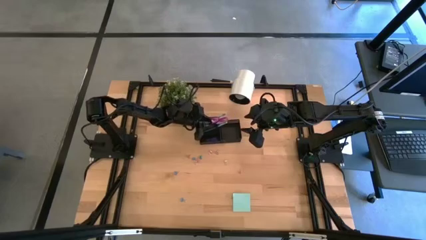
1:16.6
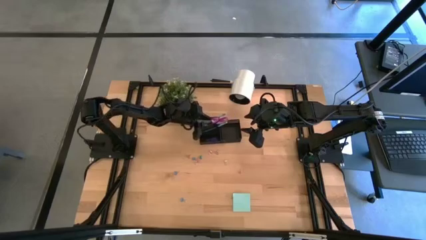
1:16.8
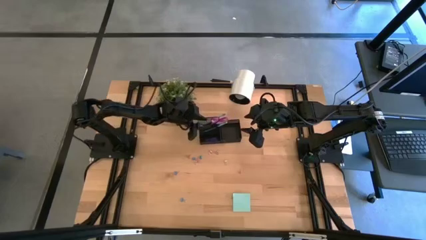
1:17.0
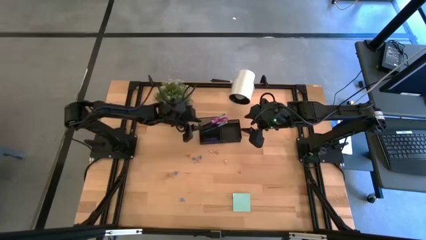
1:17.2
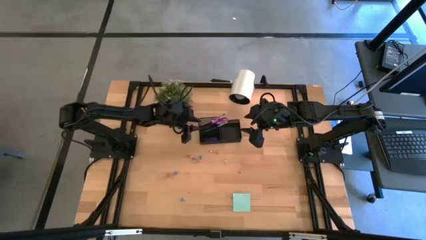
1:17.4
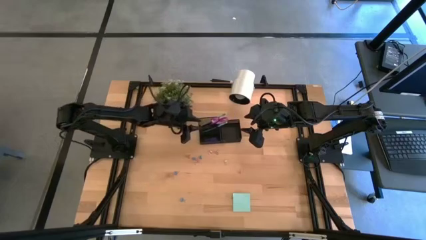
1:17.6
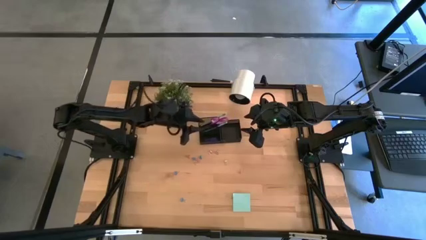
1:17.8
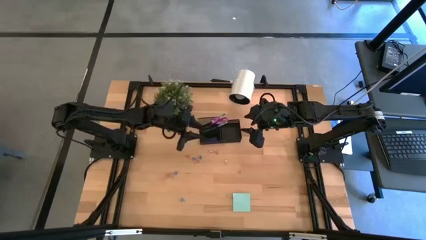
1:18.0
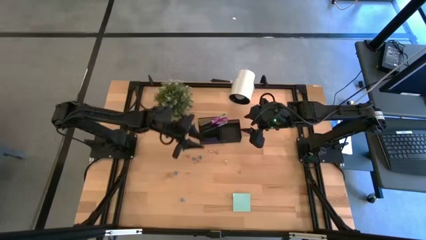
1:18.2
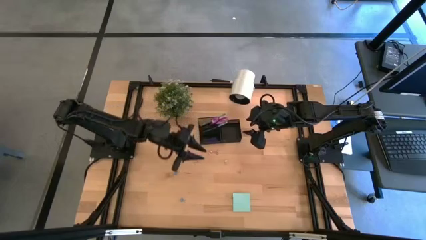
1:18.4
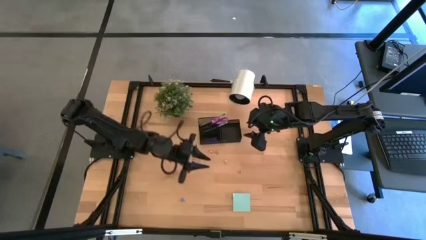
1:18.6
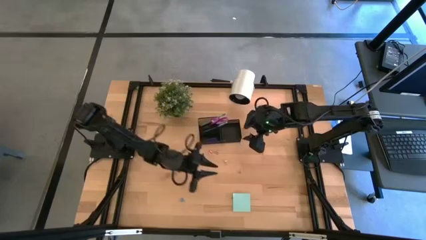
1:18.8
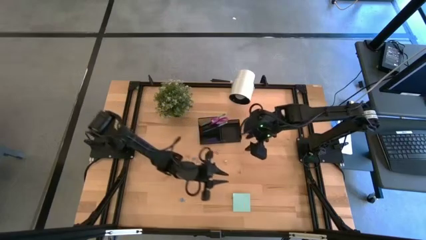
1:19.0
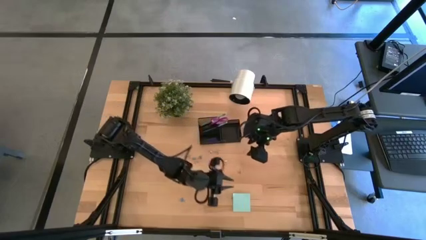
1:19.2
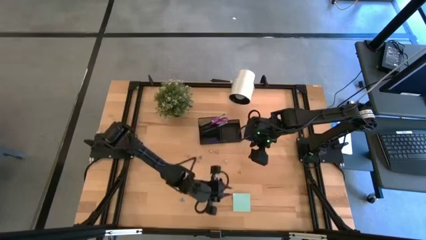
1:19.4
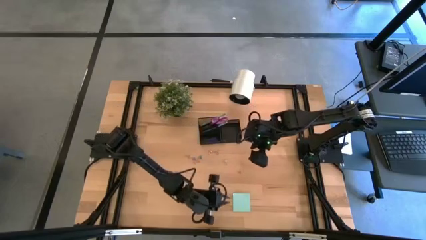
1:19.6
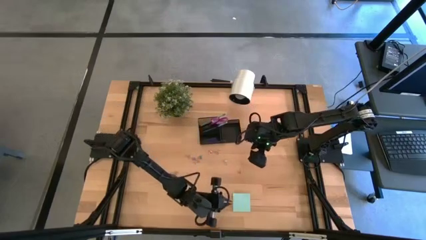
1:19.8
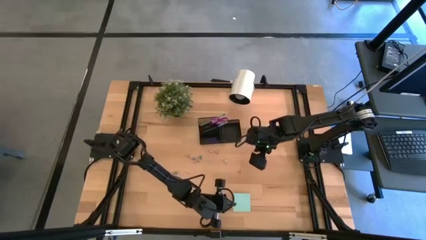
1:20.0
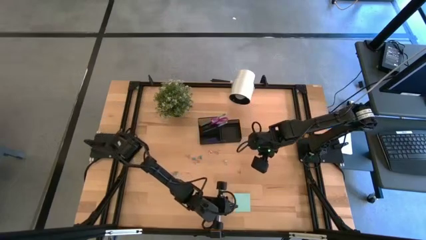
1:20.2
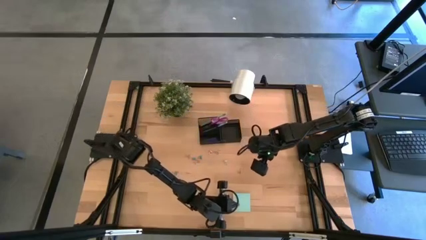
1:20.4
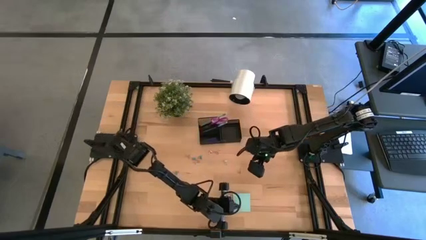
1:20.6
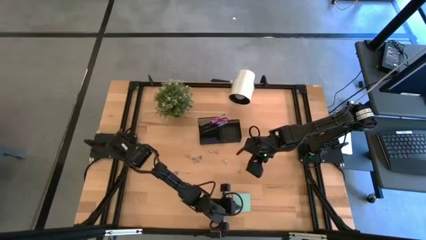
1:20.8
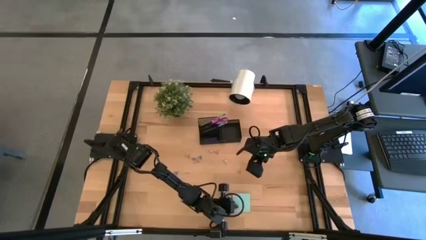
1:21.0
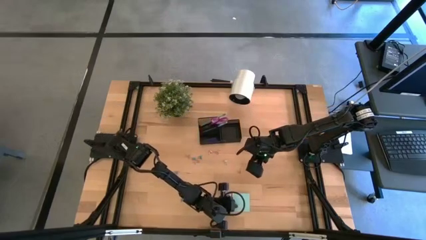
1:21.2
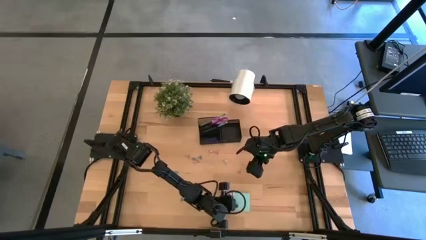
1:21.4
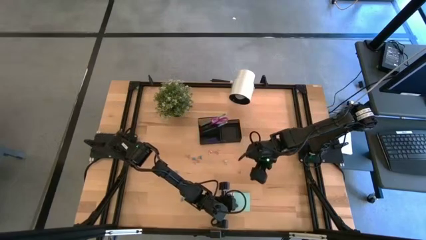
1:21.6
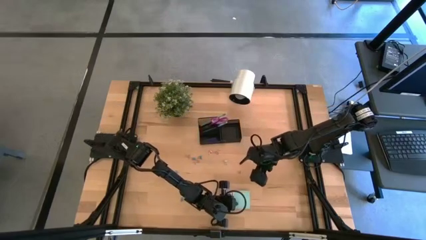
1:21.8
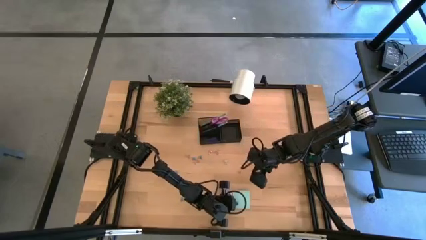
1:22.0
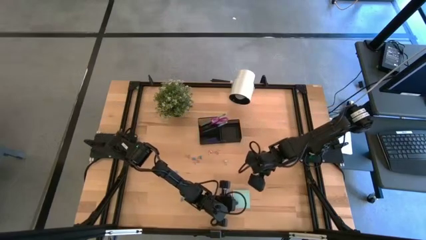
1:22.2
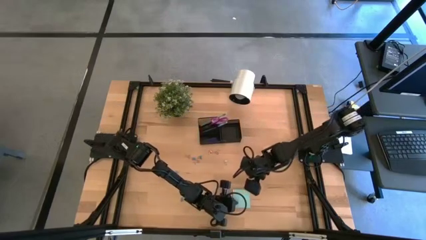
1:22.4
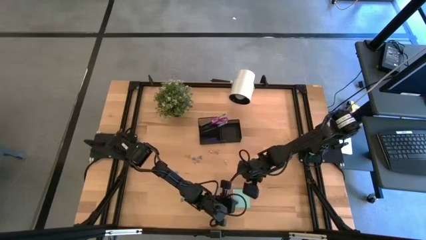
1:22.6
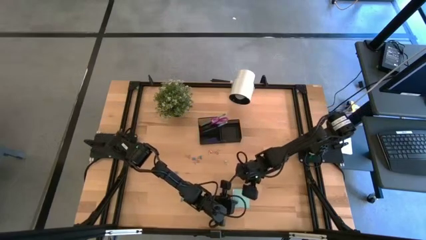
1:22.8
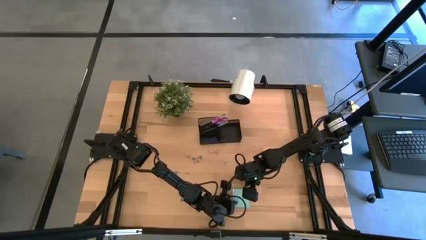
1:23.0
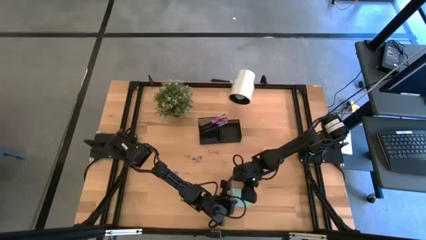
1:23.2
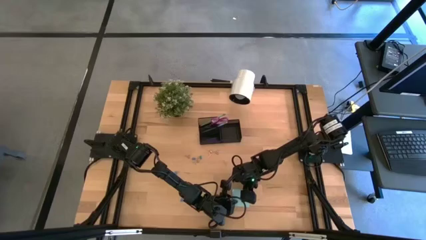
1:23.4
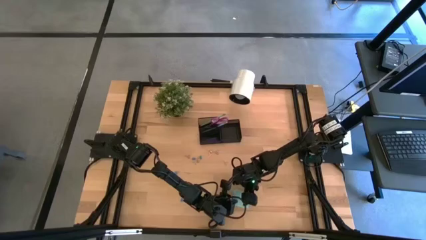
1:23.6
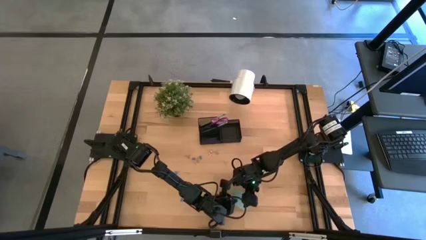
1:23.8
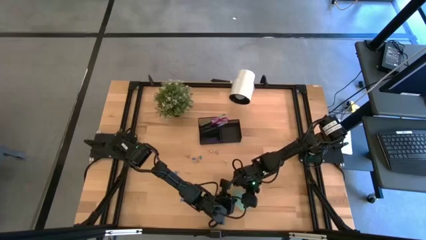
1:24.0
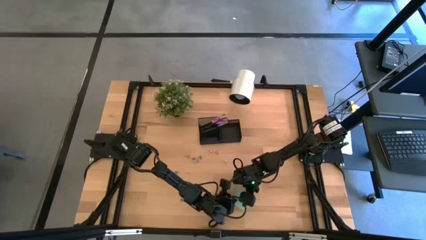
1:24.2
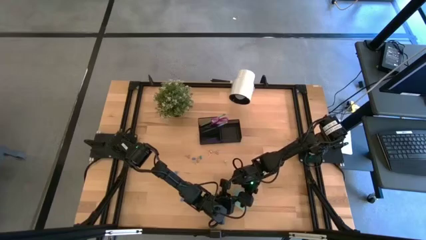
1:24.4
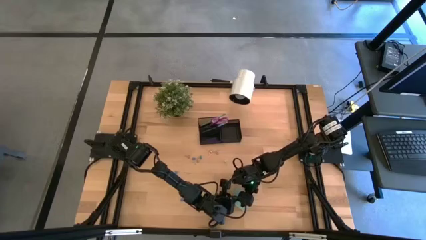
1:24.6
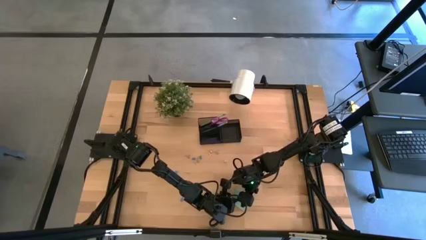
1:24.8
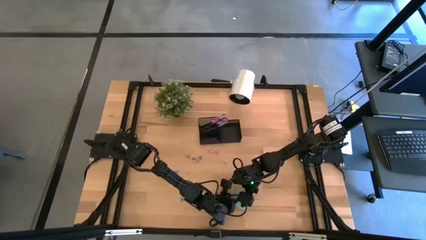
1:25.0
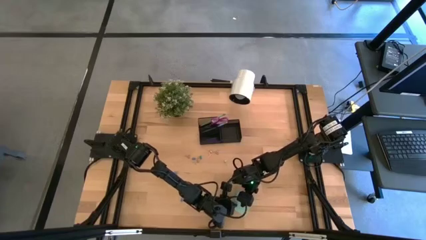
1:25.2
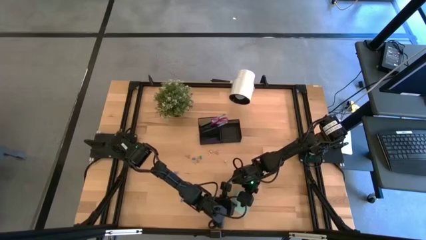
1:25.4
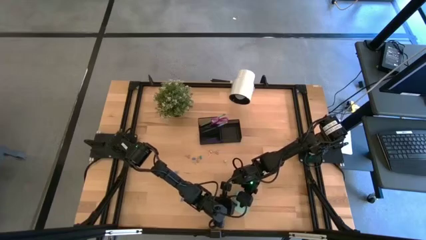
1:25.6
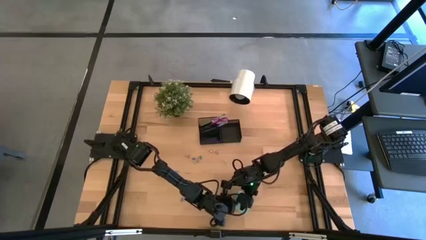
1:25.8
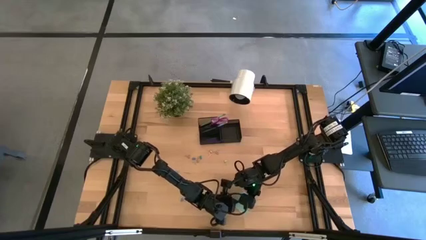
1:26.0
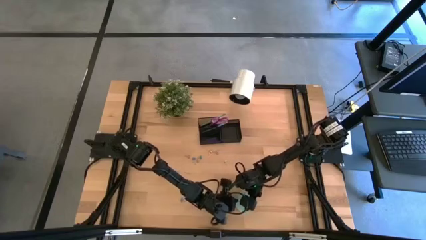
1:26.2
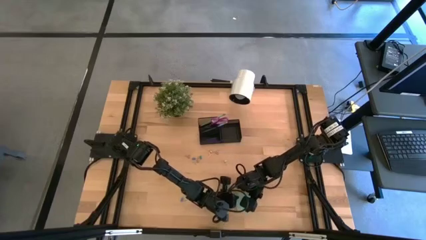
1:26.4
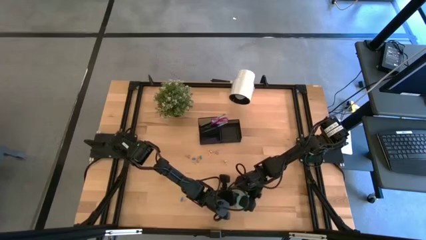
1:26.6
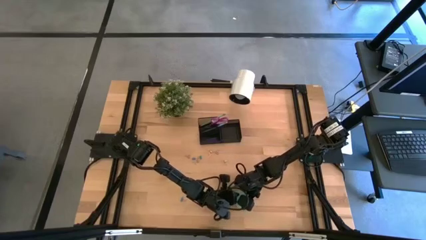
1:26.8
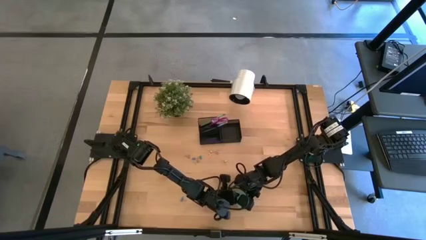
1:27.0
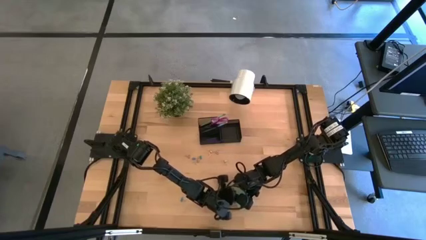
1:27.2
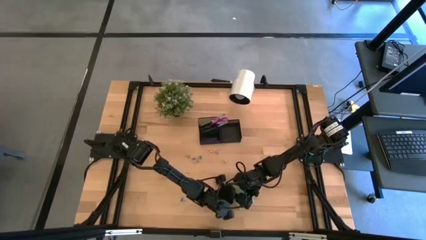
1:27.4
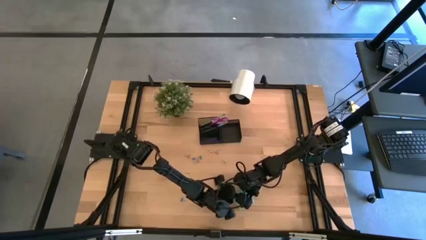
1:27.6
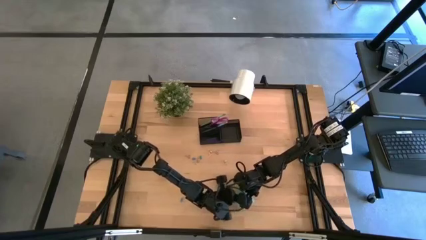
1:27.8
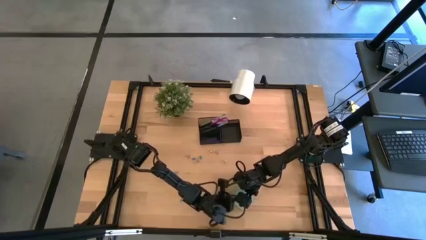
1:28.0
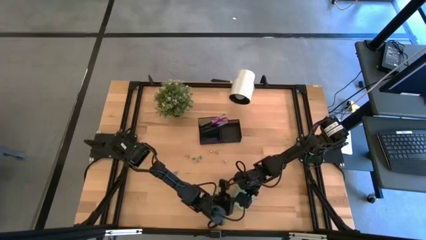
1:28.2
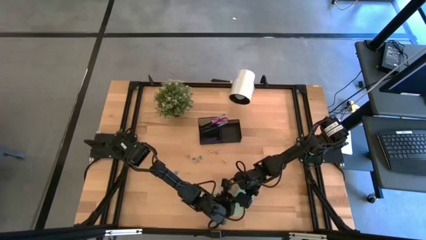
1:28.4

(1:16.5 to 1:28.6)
Task: Pick and place office supplies into organizer
Put the blue sticky notes into the black desk organizer
